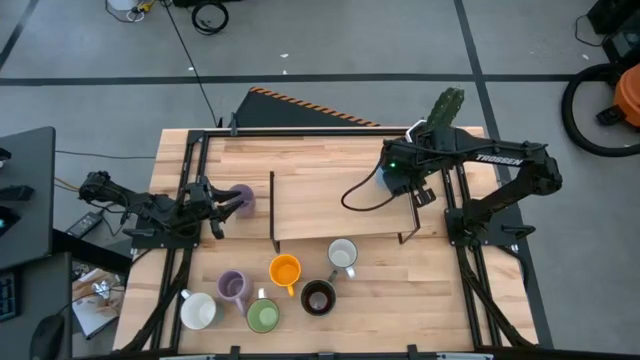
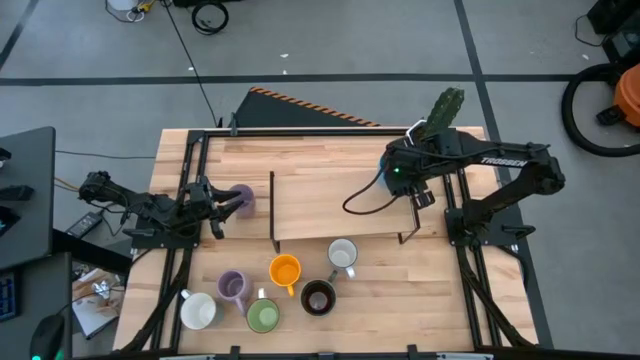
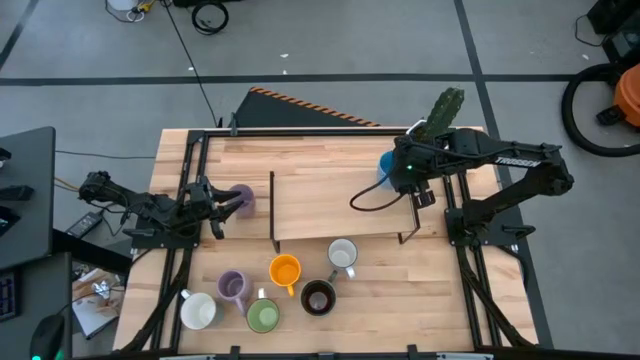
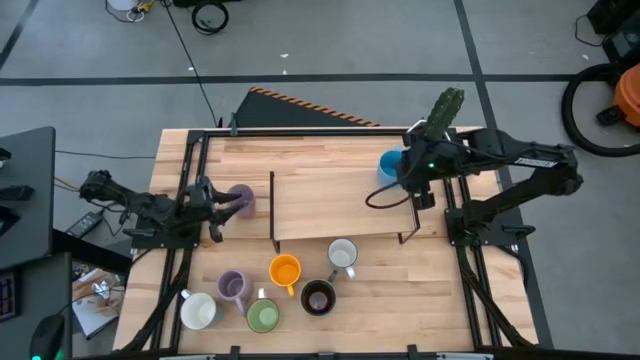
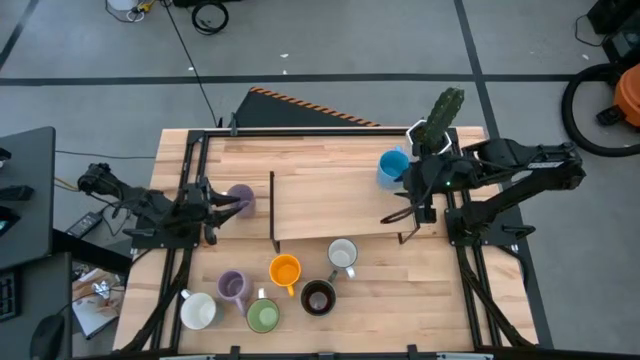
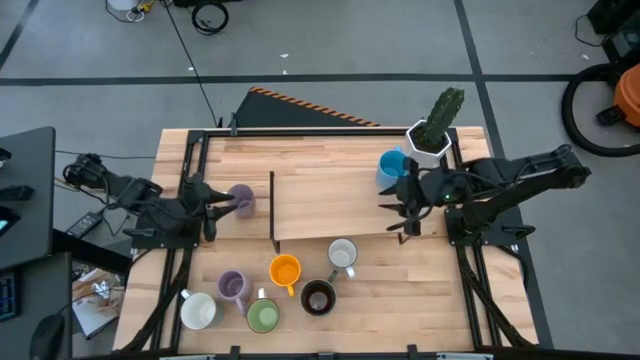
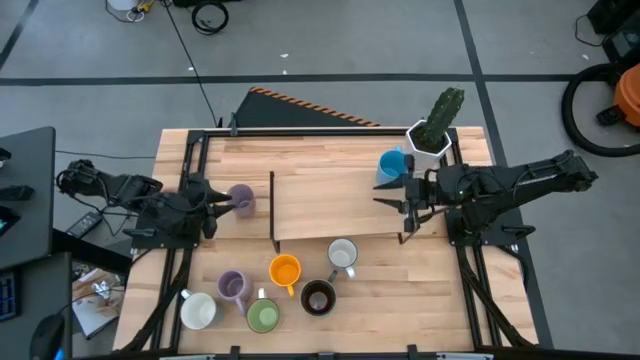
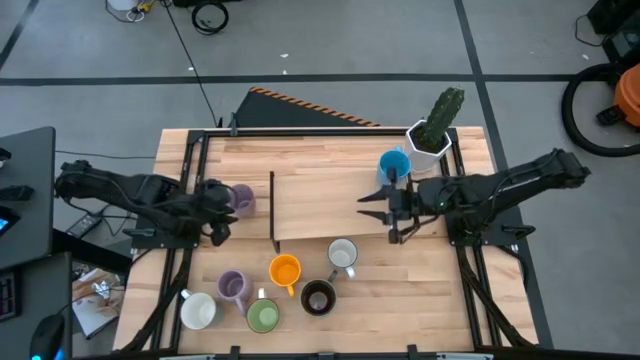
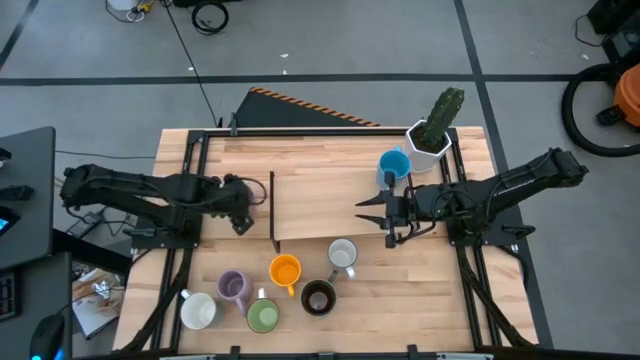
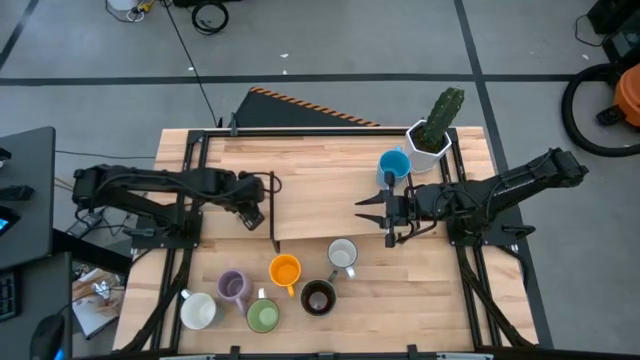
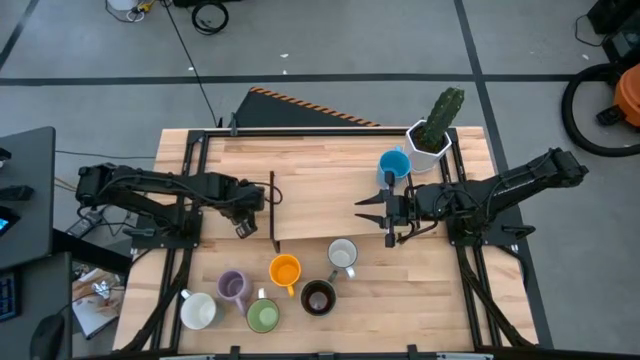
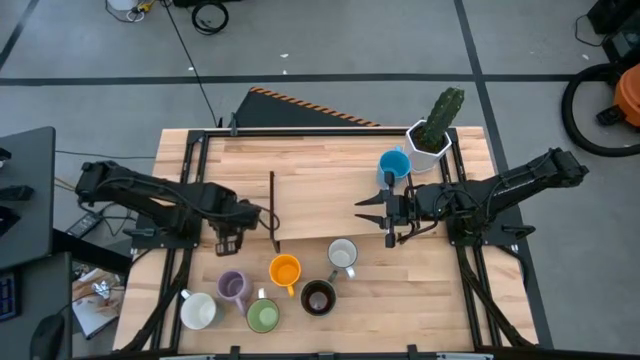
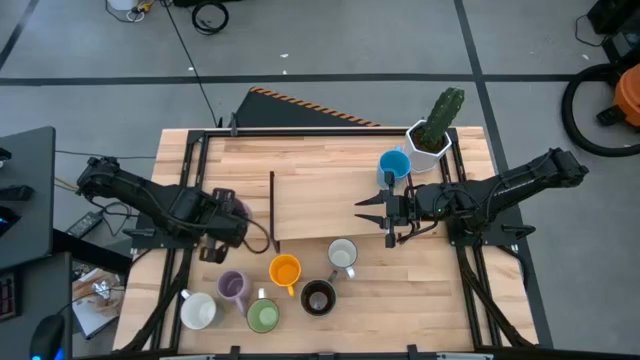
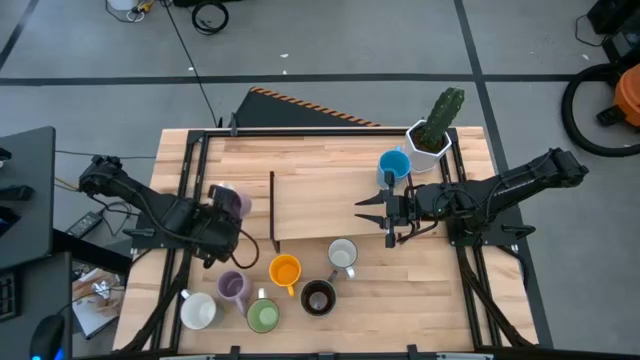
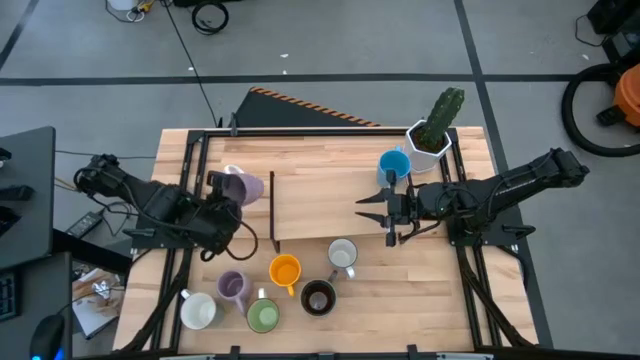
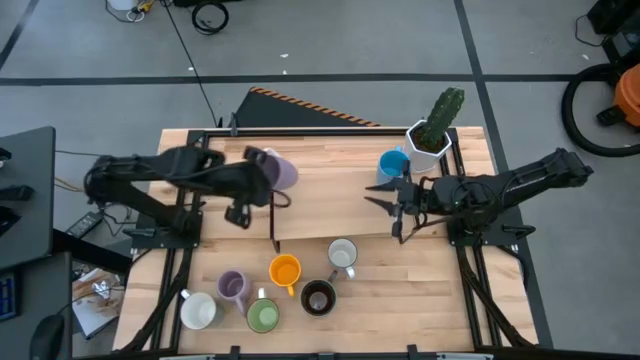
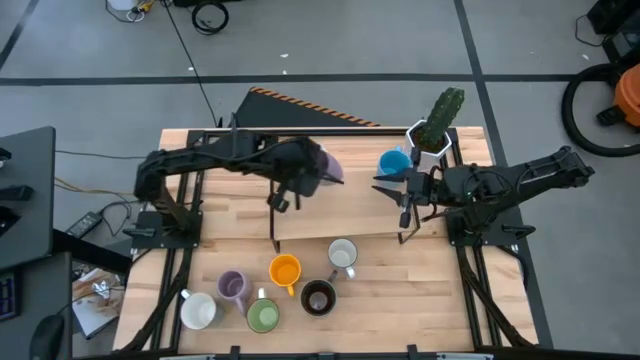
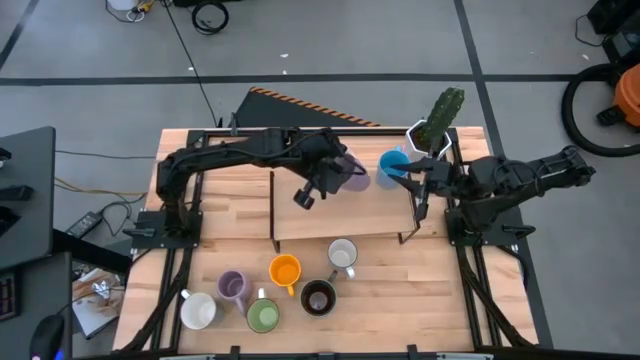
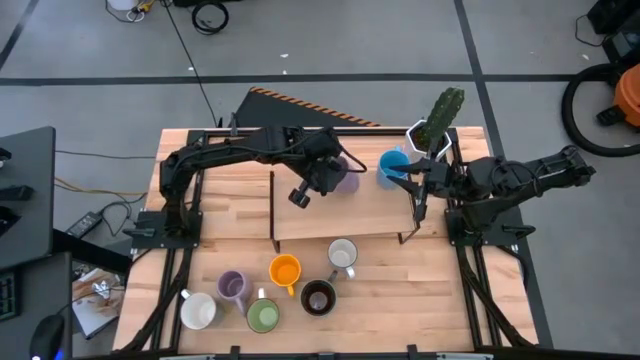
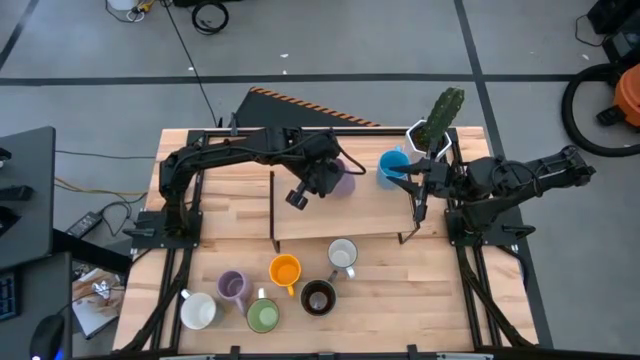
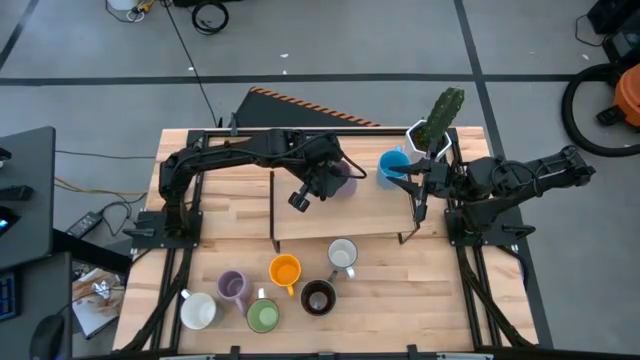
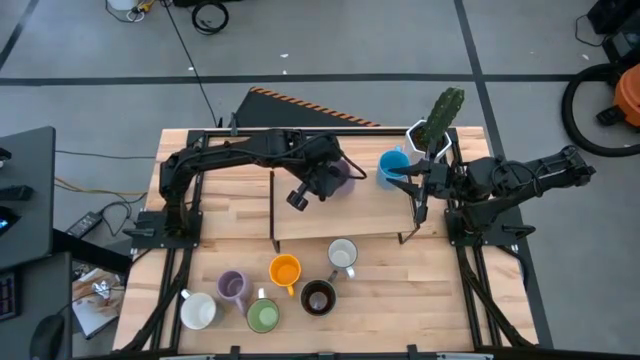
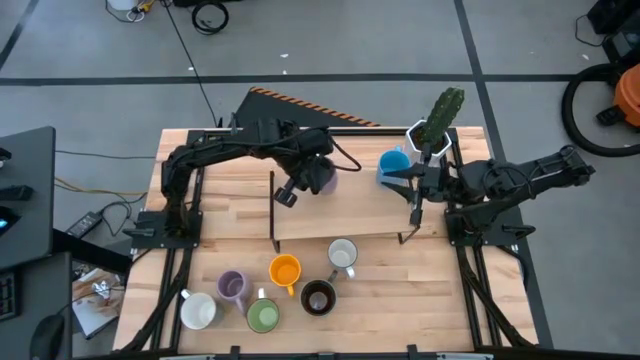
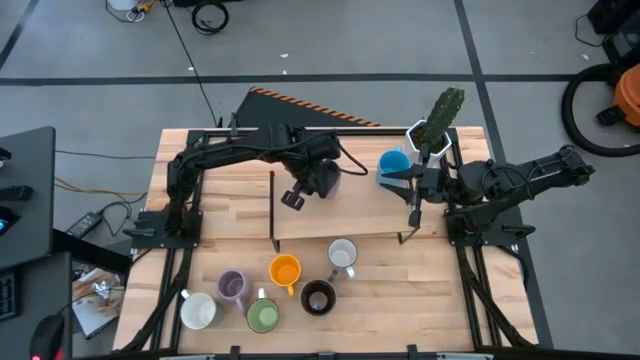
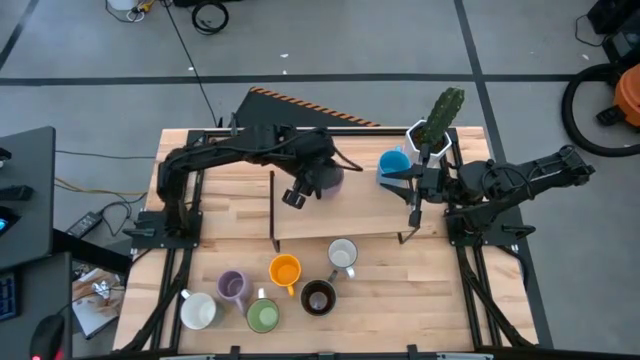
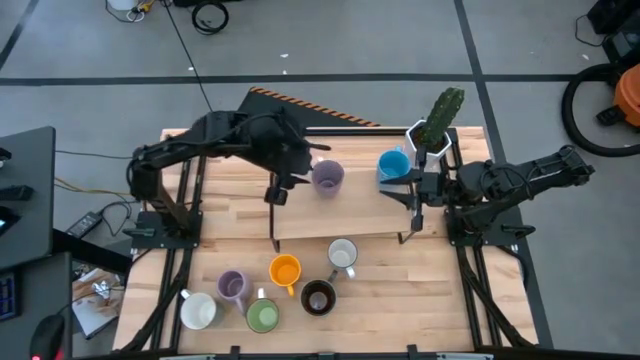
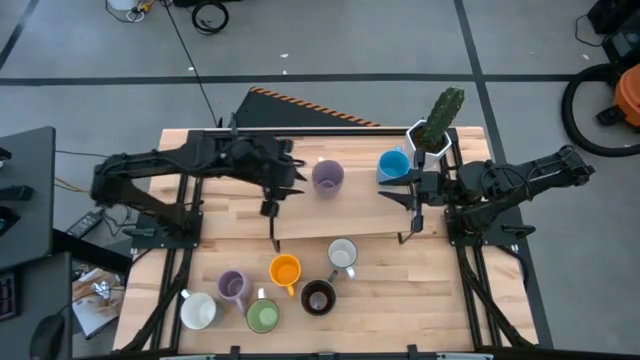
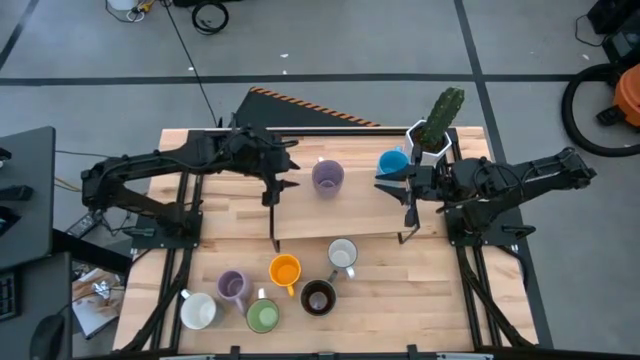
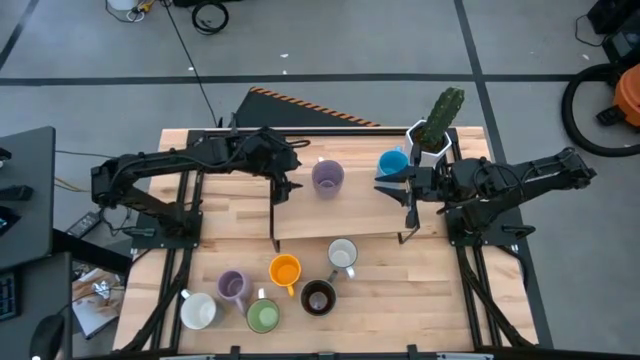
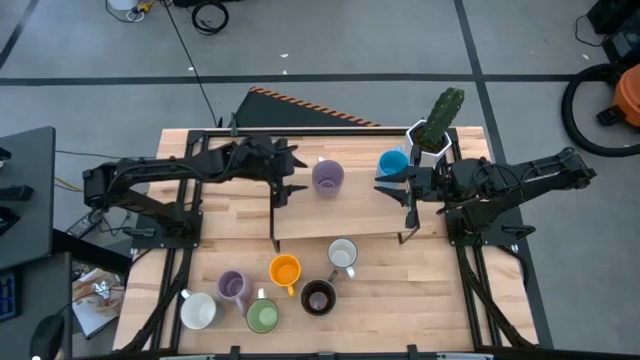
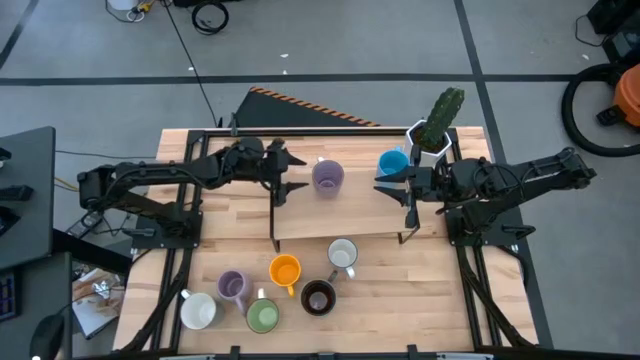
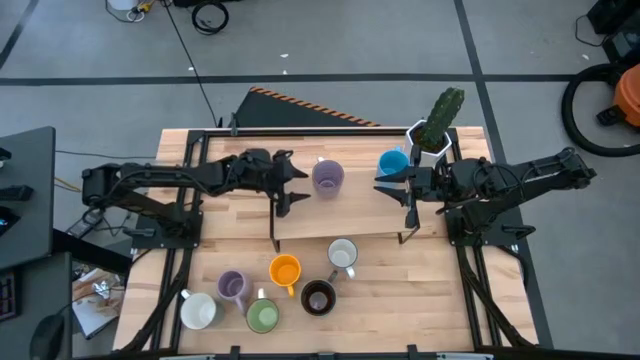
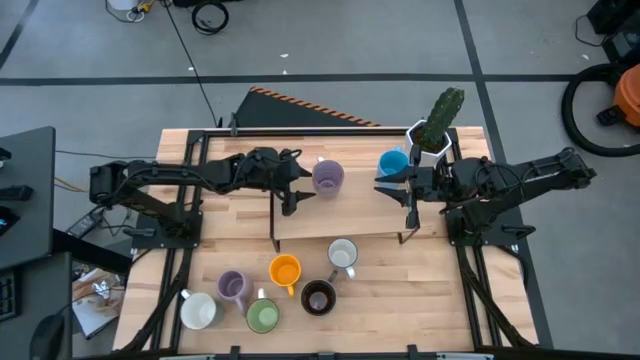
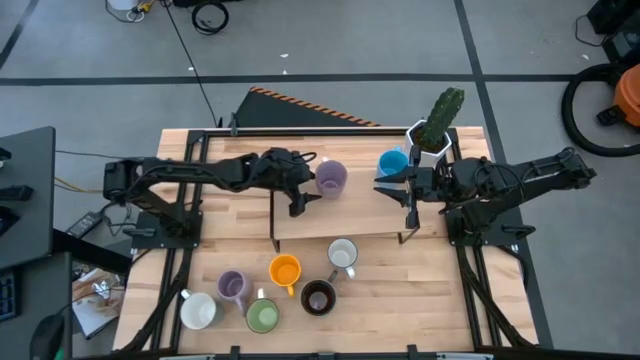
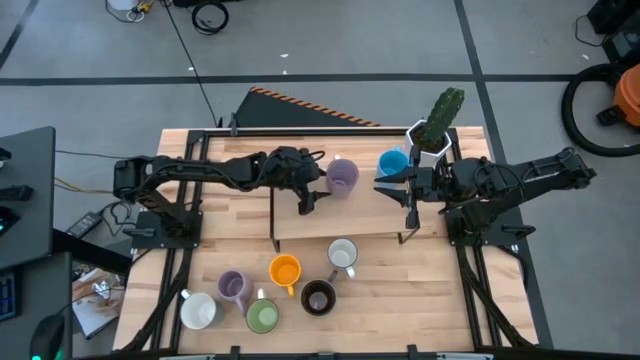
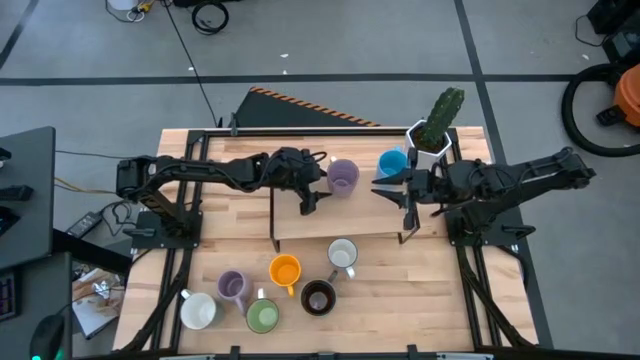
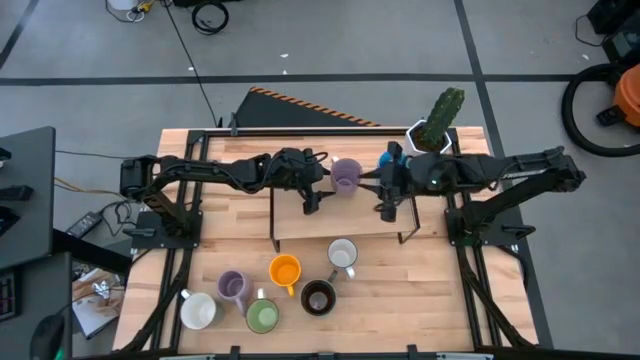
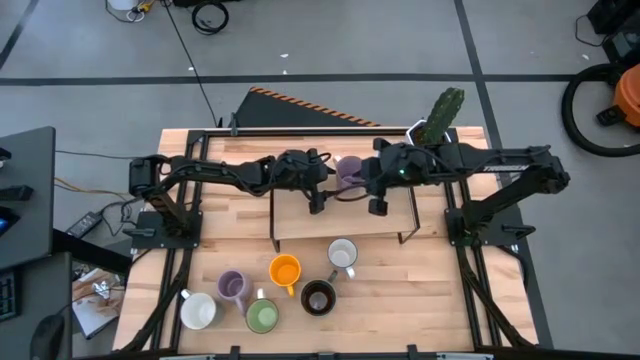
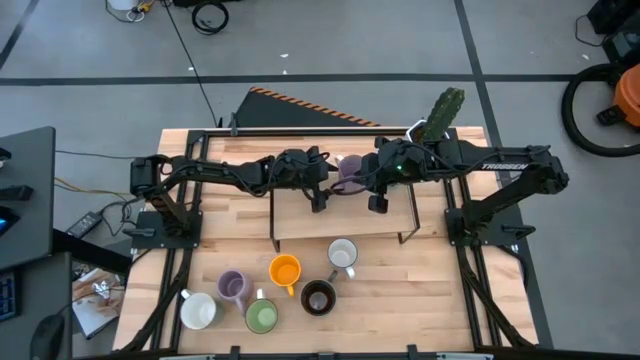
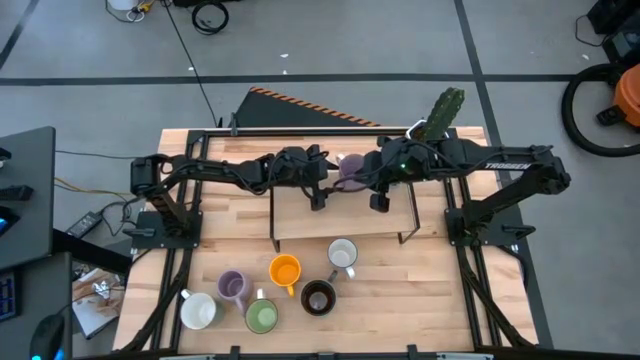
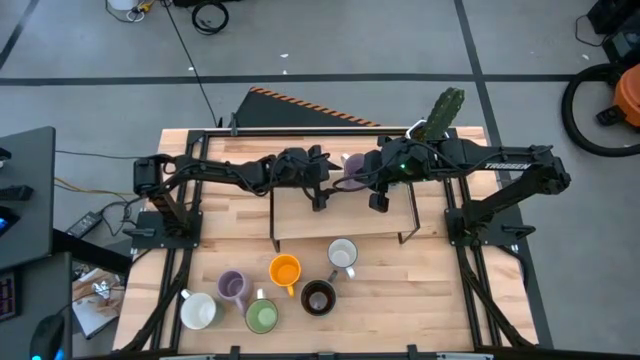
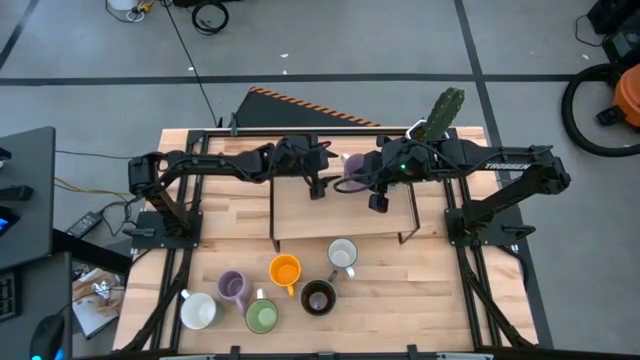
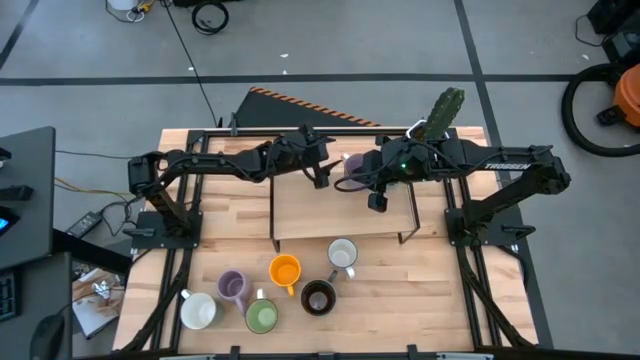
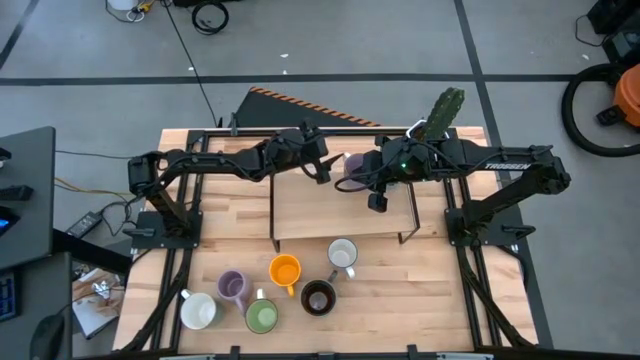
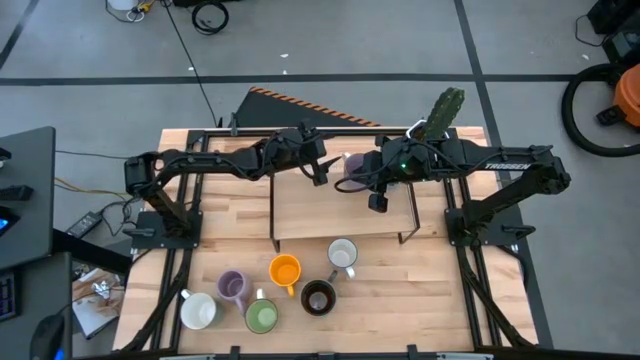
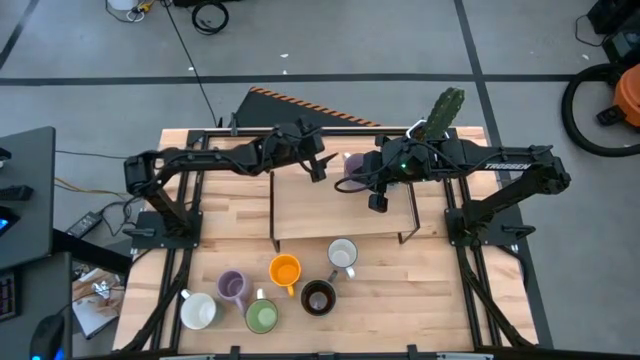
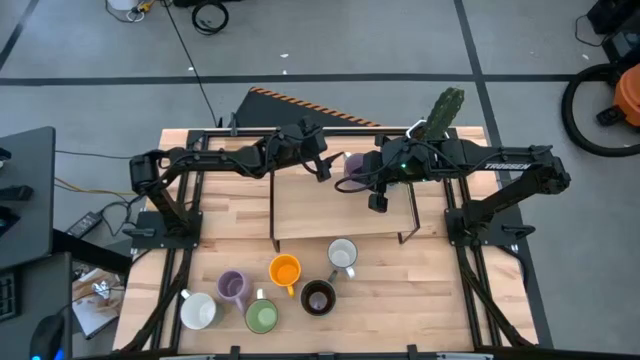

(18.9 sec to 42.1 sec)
Task: Place coffee mugs
Put the top purple cup on the shelf
